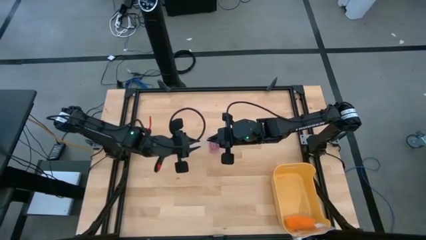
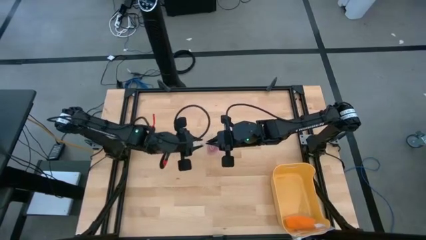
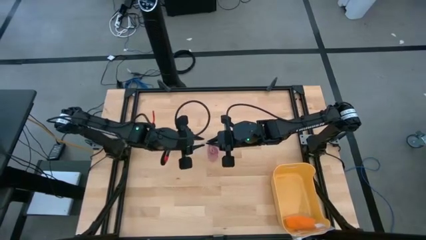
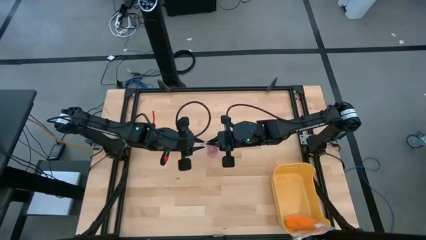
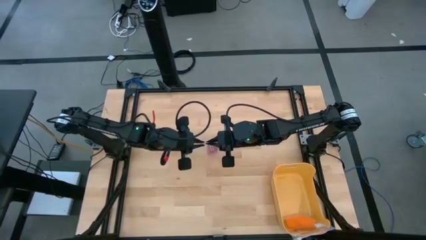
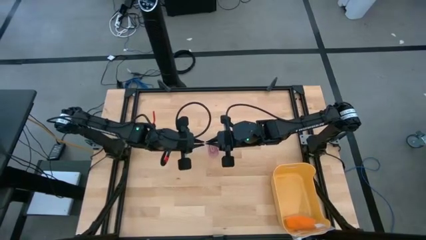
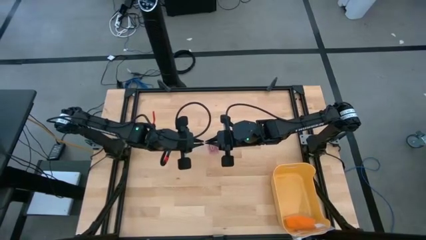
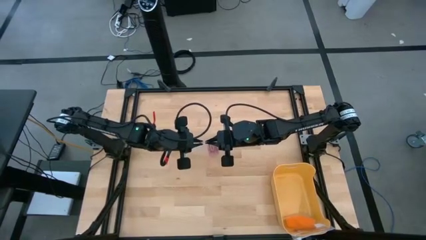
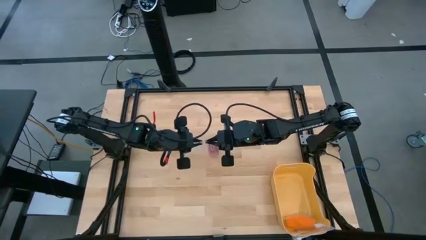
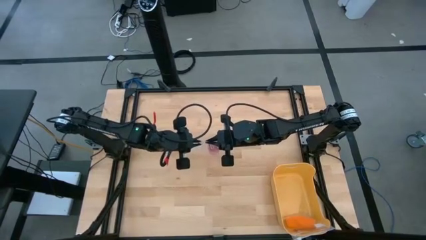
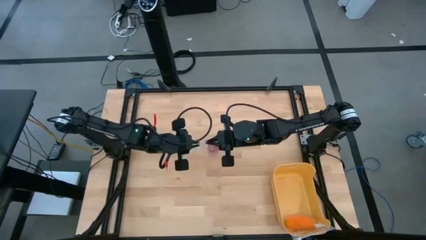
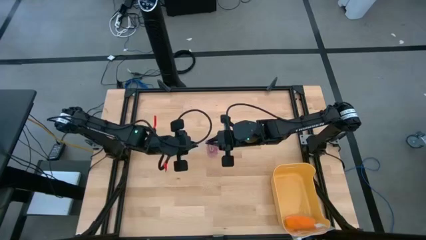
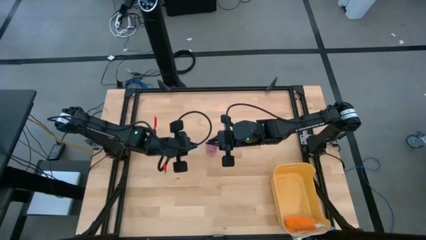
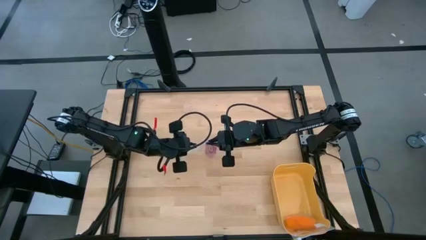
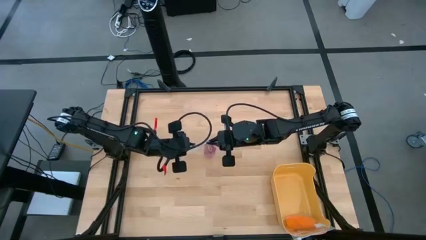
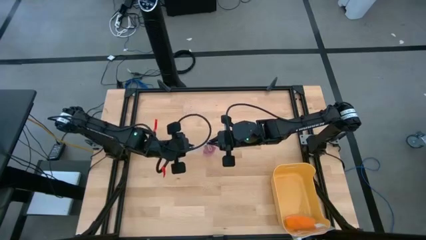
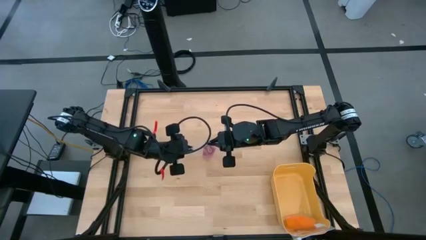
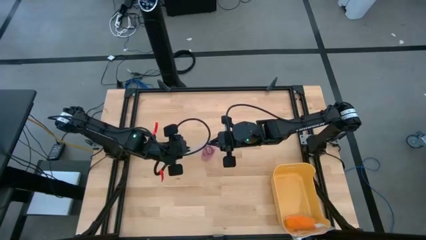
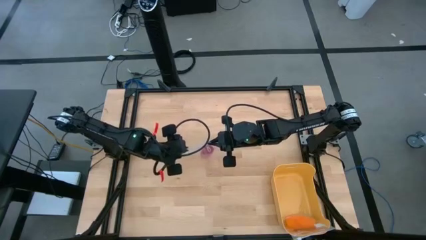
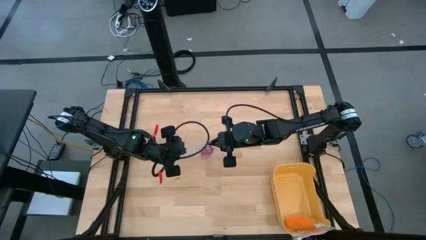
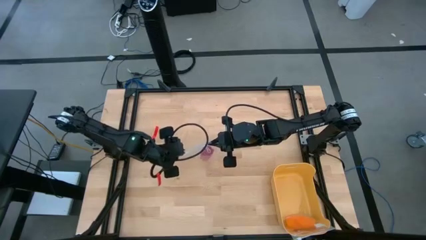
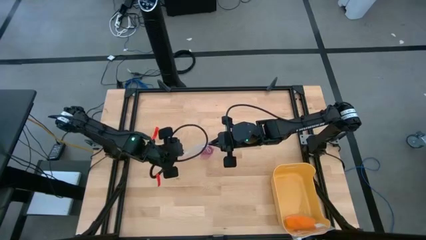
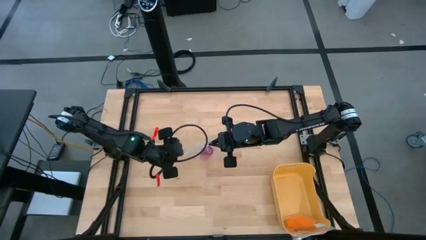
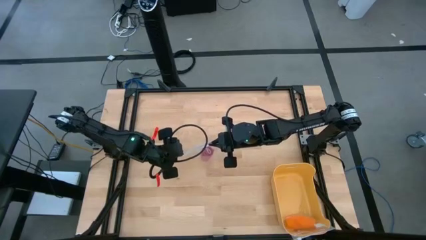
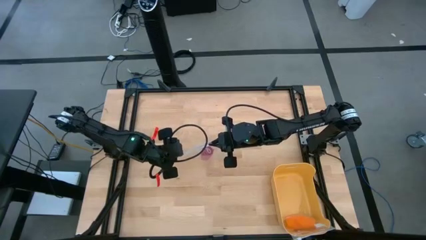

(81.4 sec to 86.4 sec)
Task: Roll bandage
Close the transparent zip bag

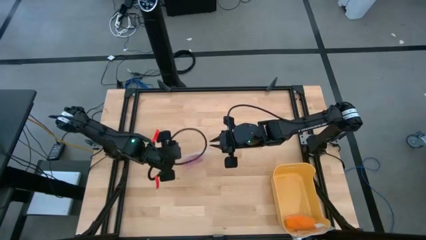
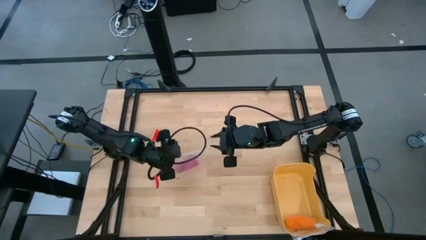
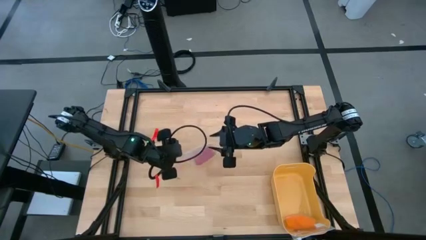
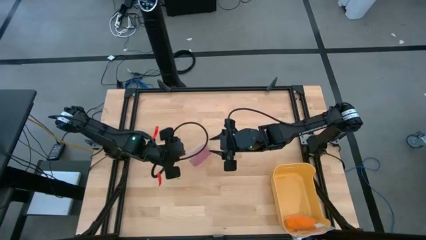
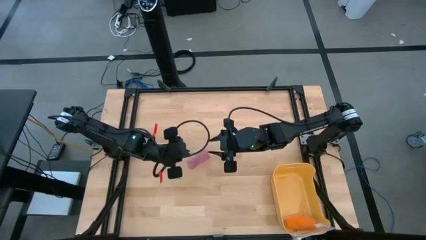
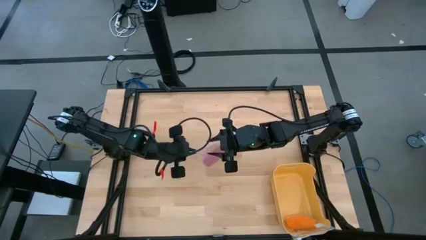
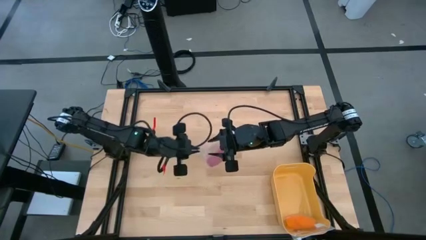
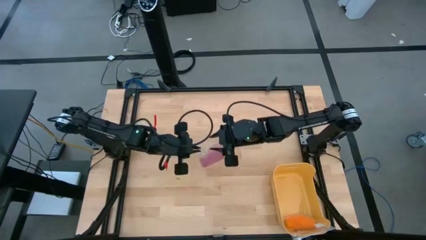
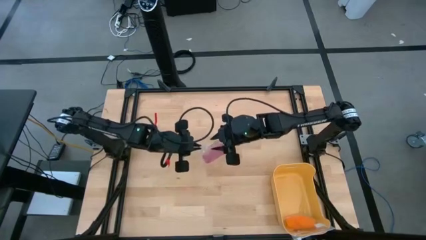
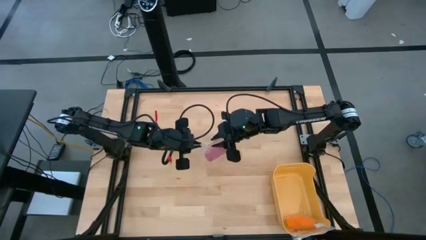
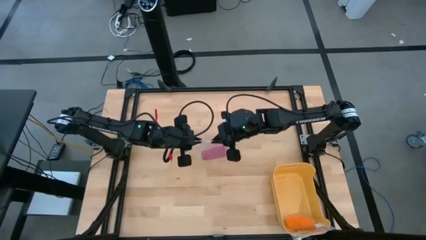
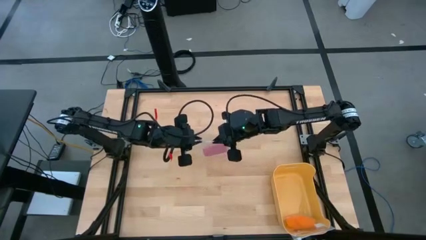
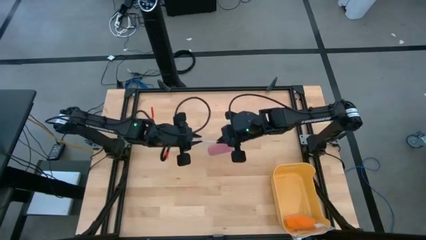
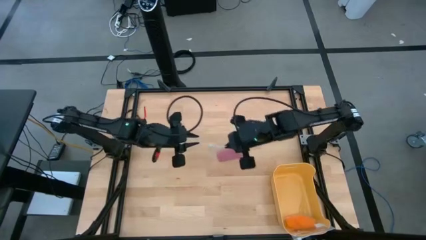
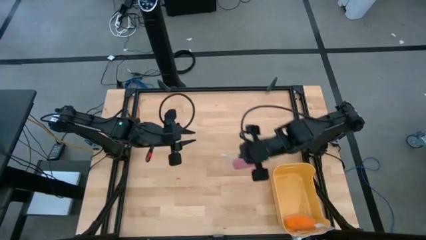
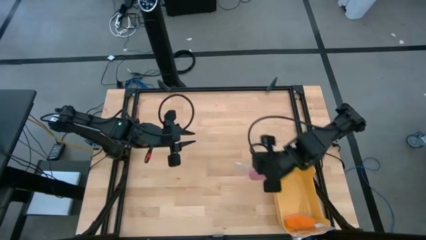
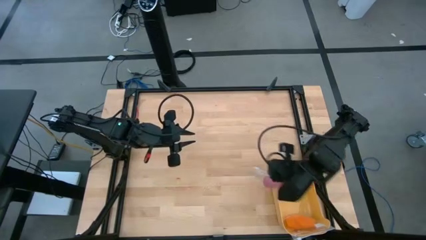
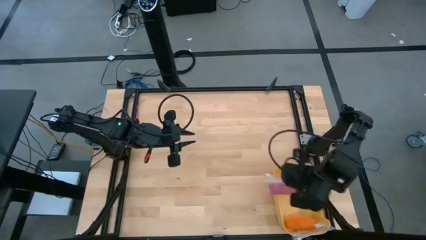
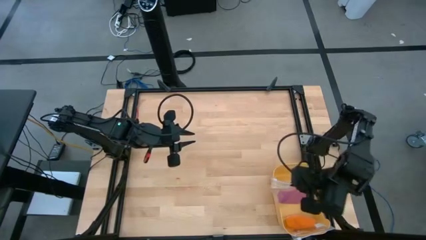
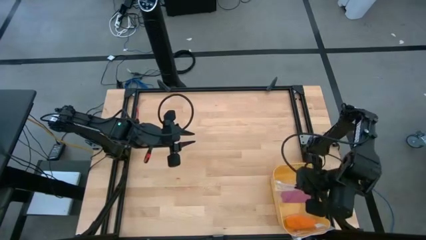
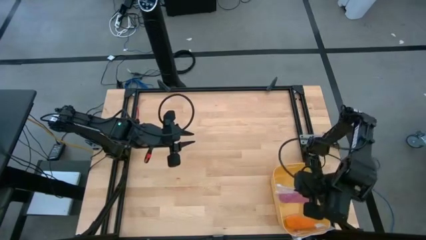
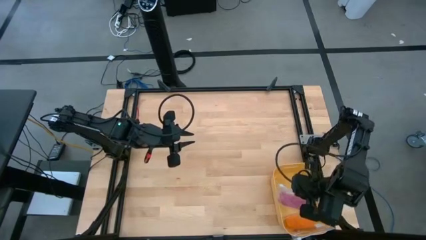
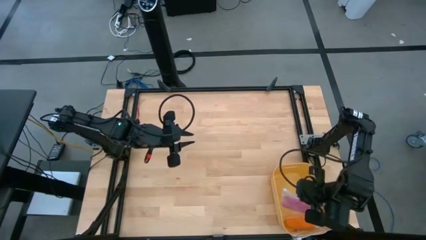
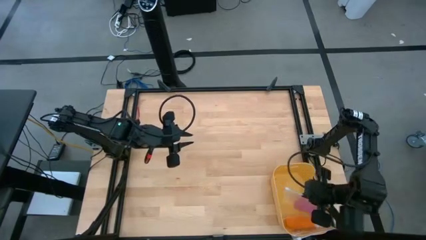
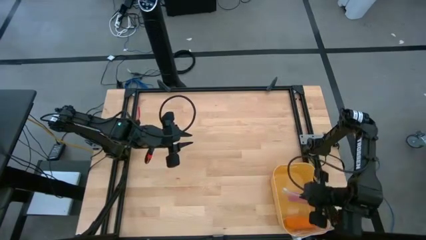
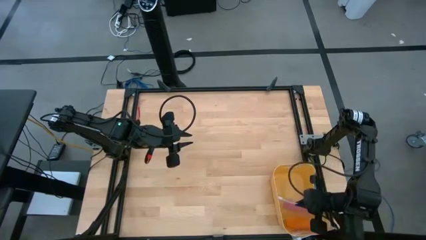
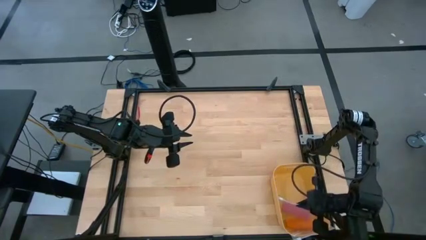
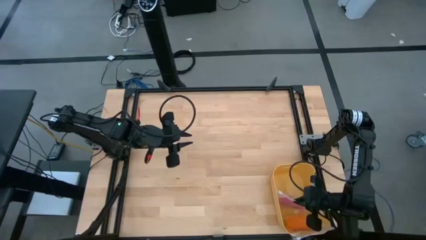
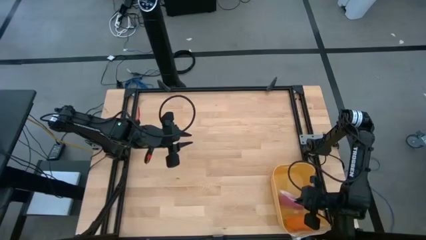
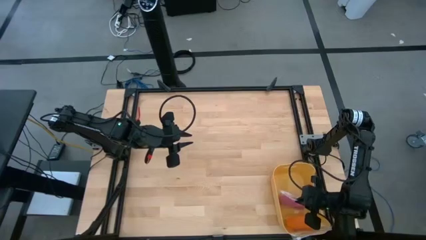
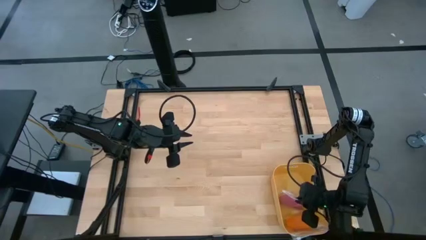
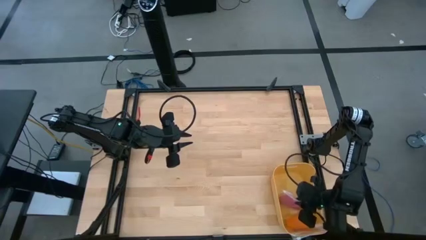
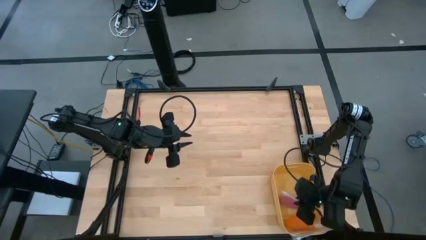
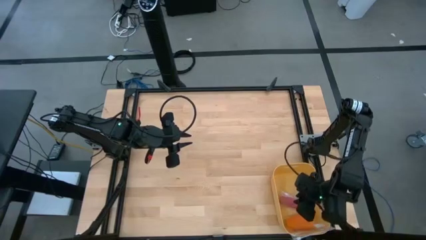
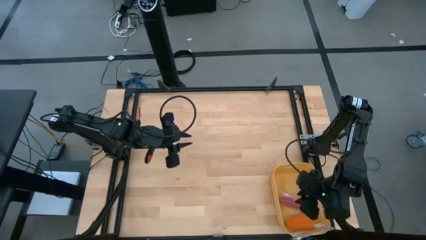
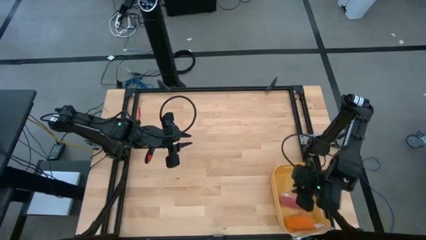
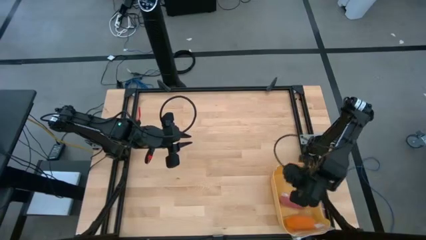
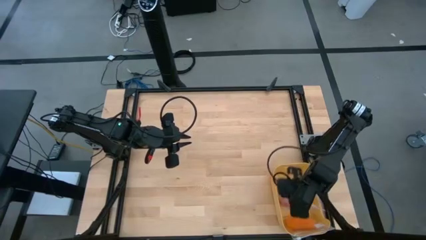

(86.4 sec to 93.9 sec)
Put the transparent zip bag in the yellow bin

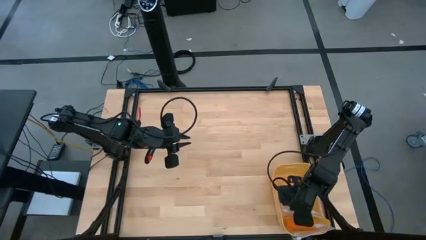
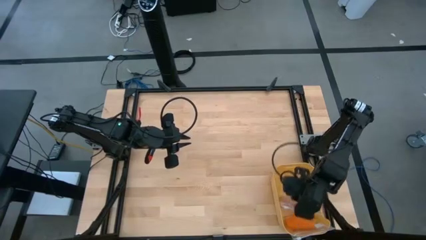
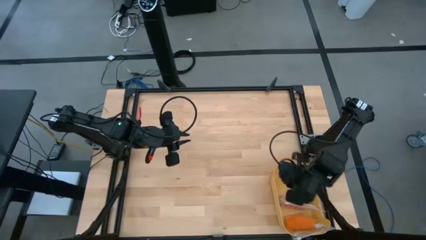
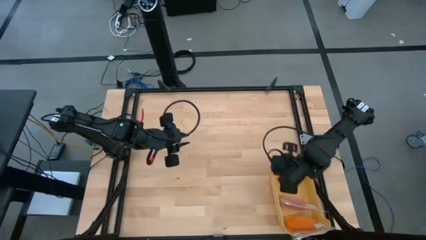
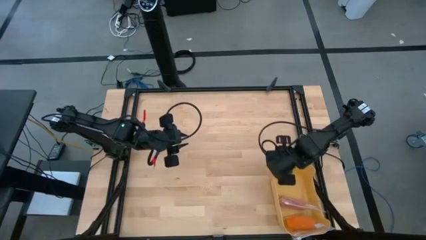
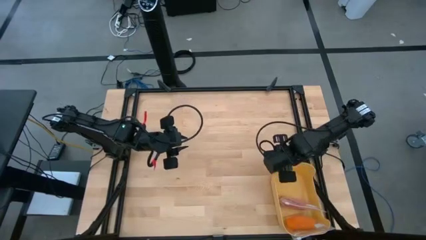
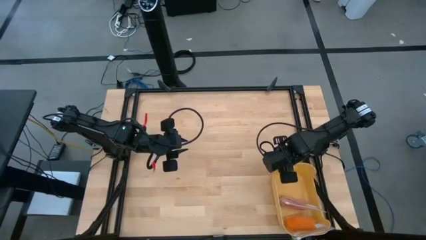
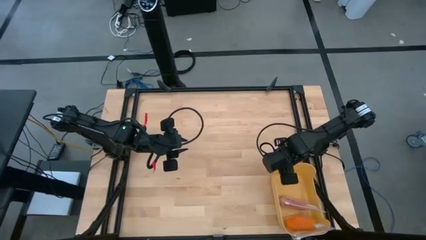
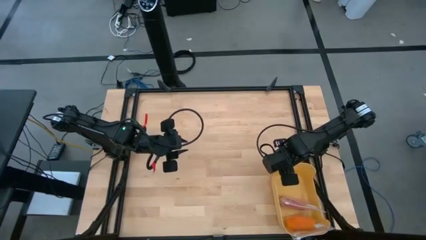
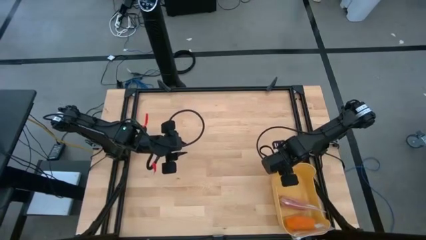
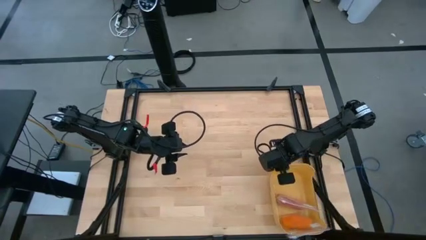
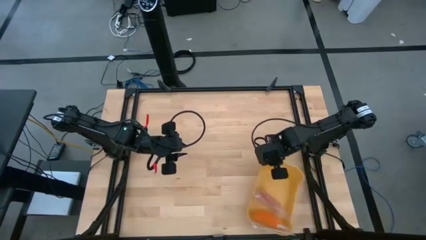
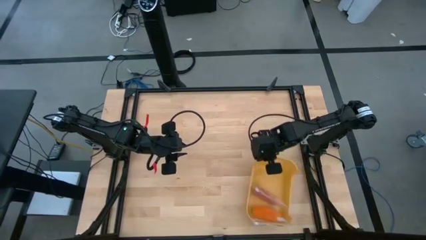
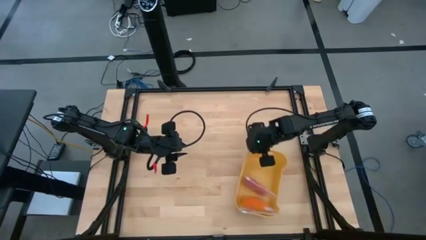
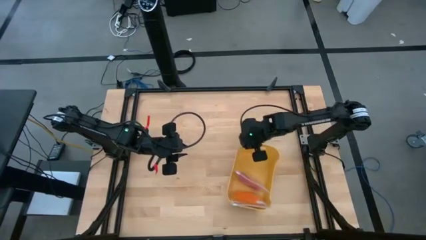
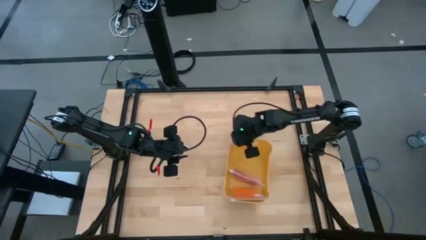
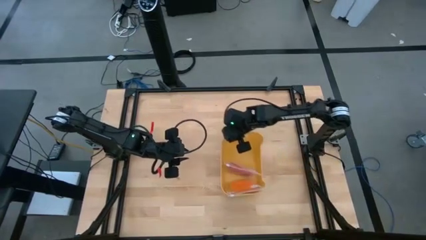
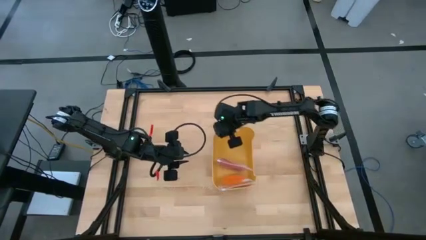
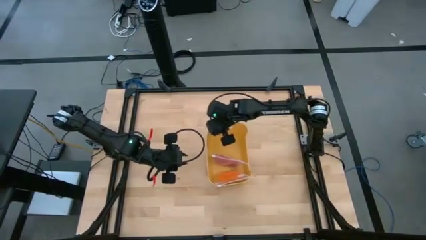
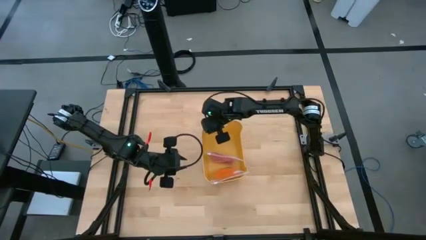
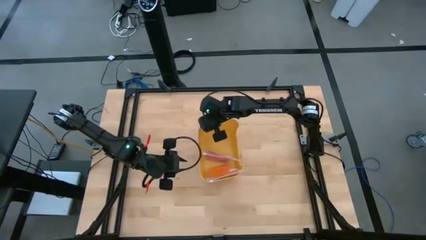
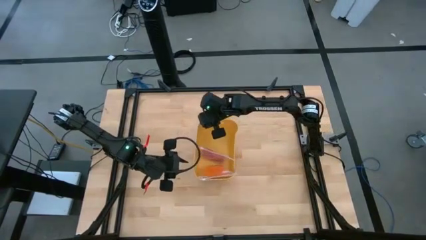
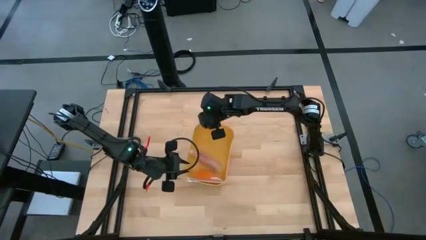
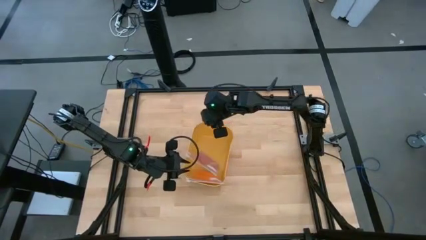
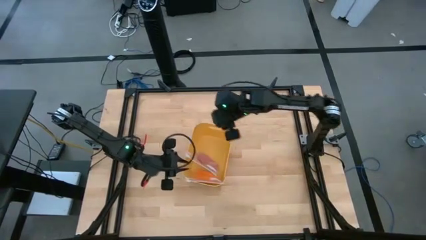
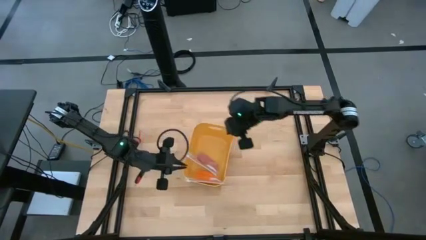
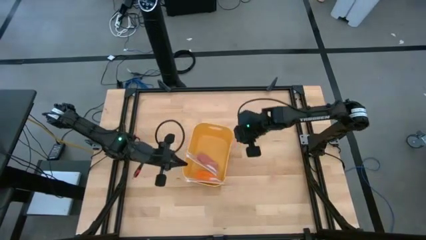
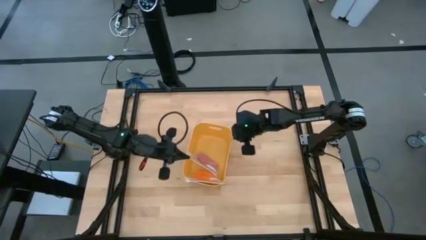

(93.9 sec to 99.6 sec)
Move the yellow bin to the center of the table
